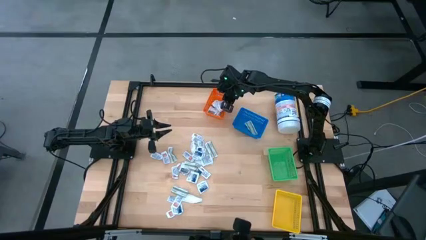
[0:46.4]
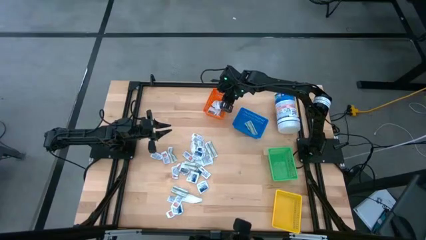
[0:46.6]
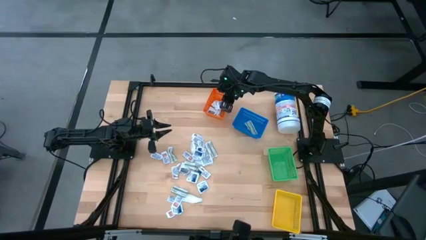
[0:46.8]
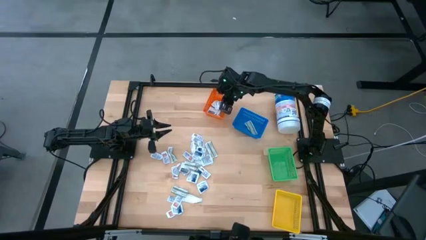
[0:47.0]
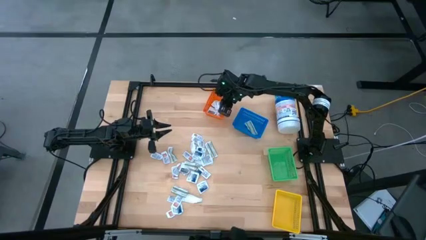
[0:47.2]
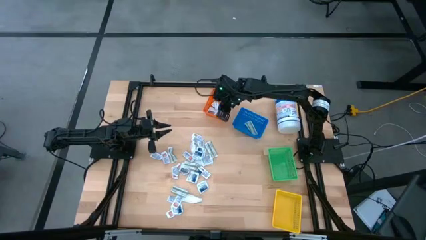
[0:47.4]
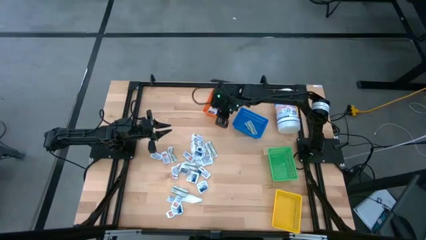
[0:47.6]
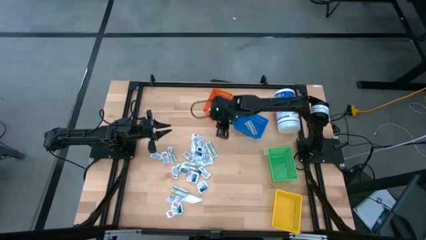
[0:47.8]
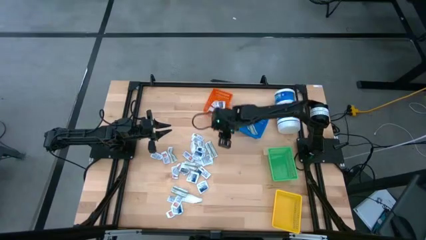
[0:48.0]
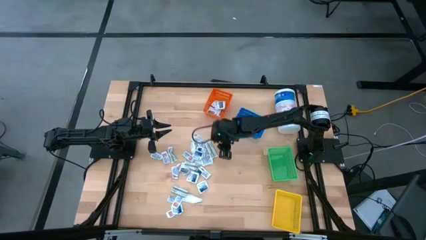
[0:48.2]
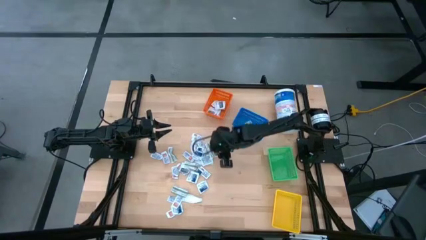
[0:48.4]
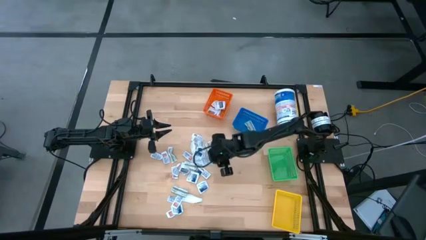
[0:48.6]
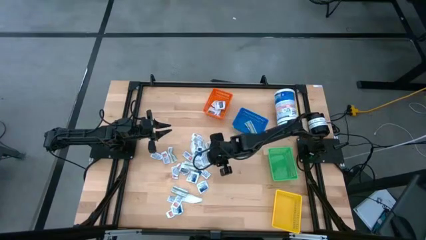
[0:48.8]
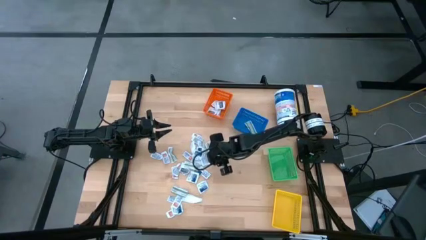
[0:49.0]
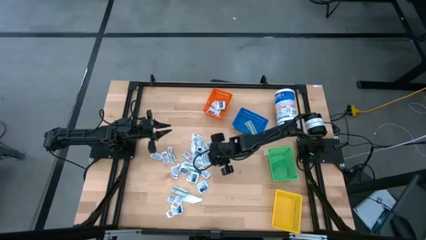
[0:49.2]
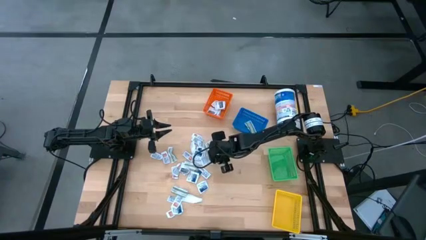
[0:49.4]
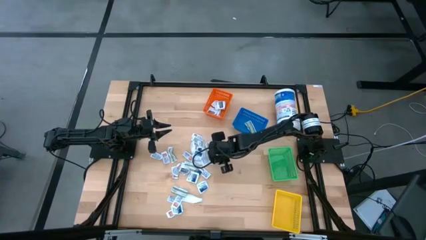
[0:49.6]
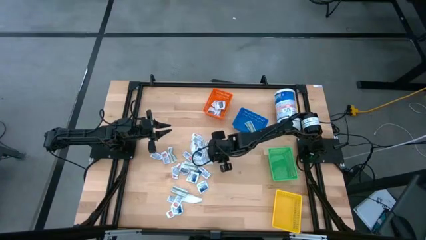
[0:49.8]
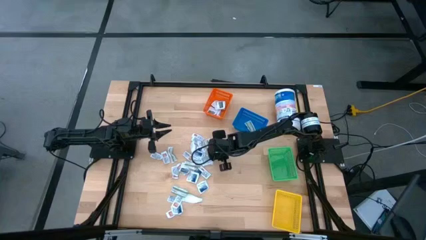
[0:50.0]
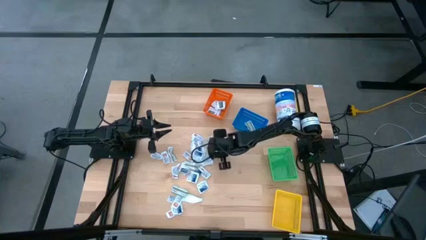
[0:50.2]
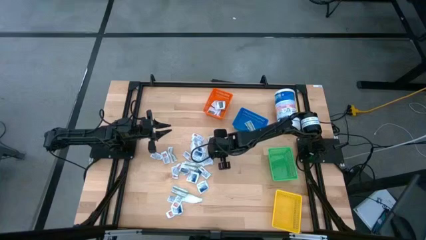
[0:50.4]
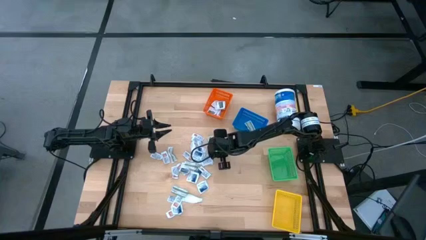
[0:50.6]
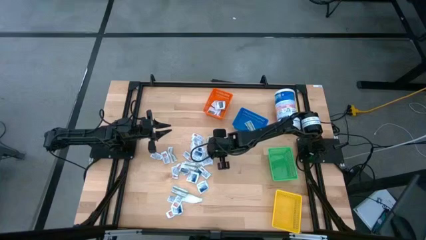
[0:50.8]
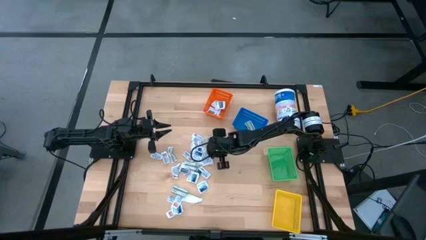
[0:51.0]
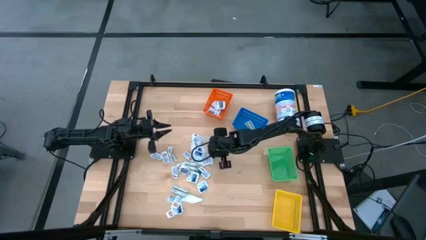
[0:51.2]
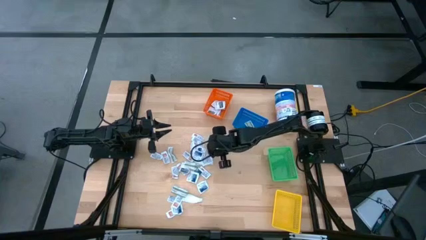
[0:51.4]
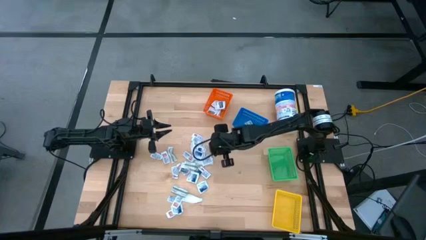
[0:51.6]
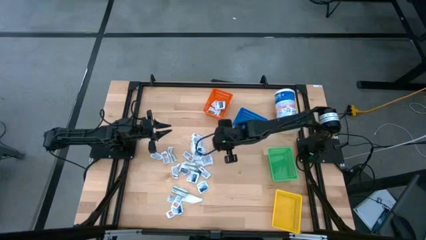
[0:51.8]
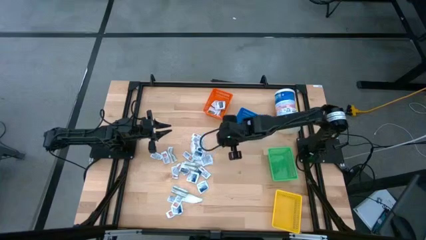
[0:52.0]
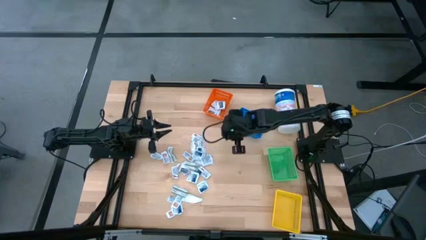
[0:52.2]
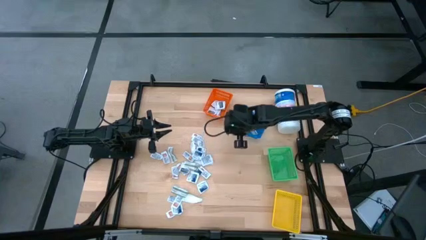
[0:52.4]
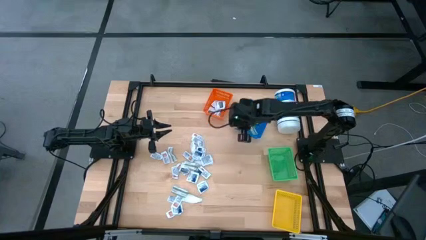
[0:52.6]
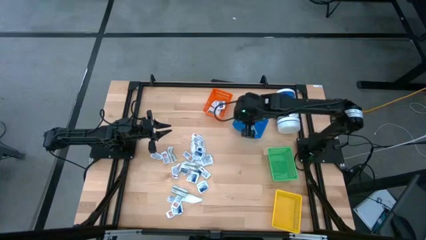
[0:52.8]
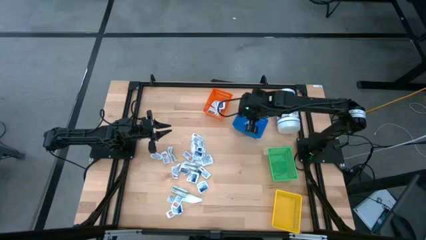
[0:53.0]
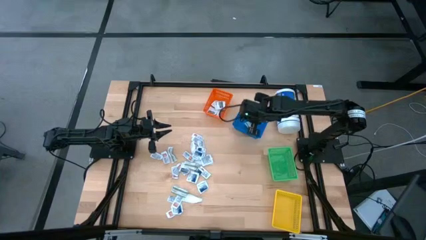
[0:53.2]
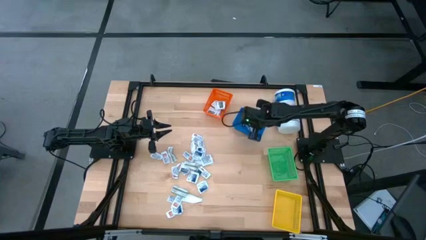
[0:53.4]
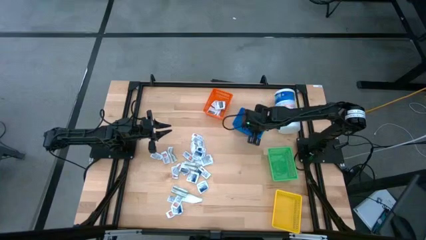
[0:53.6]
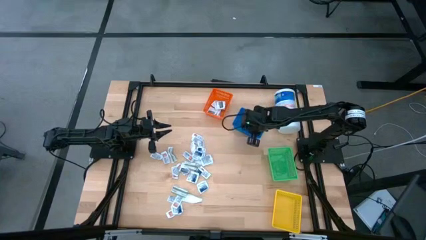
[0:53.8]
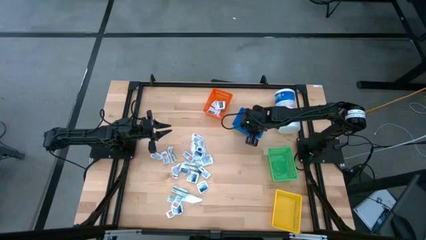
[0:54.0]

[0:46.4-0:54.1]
Task: Pick & Place First Aid Supplies
Put the green bandage pack into the blue basket

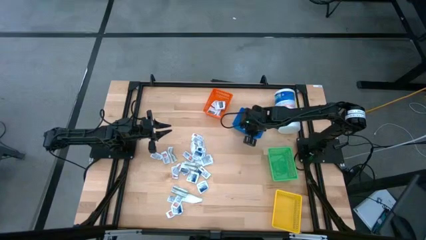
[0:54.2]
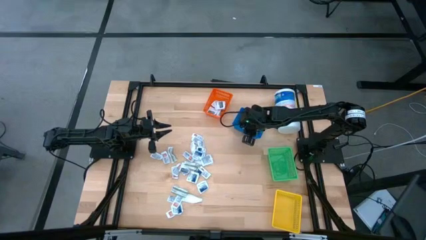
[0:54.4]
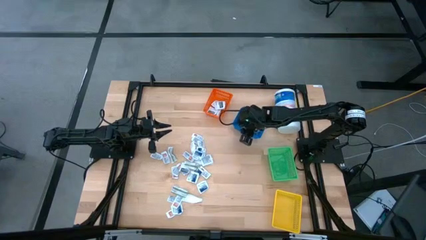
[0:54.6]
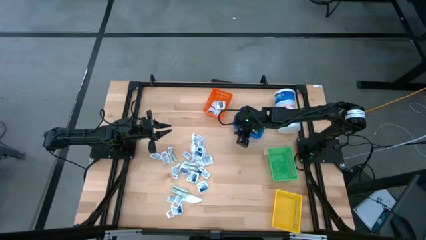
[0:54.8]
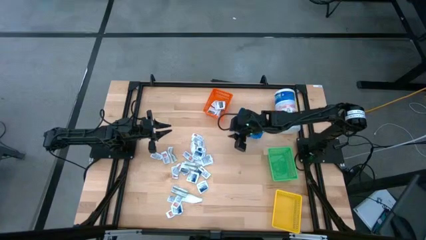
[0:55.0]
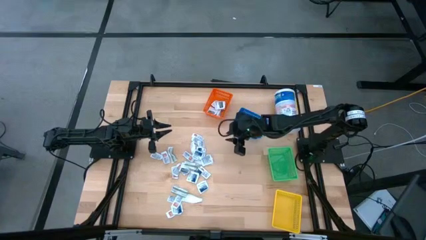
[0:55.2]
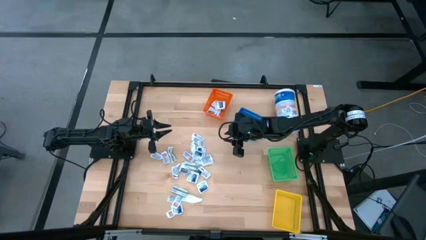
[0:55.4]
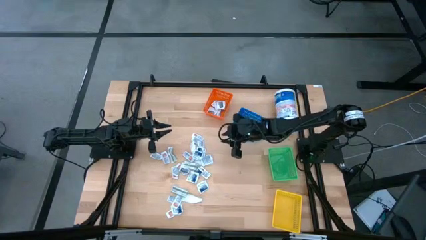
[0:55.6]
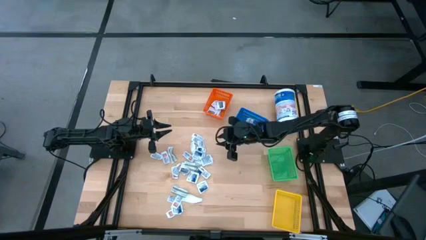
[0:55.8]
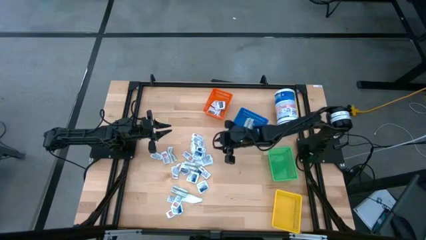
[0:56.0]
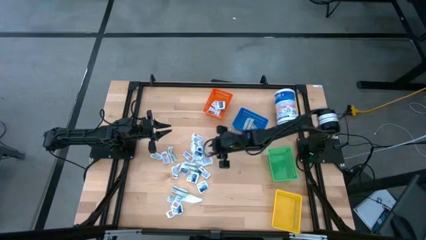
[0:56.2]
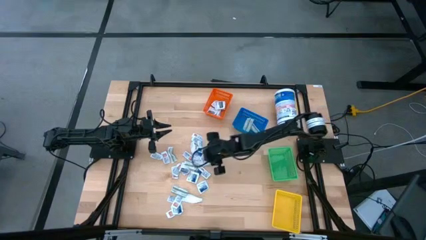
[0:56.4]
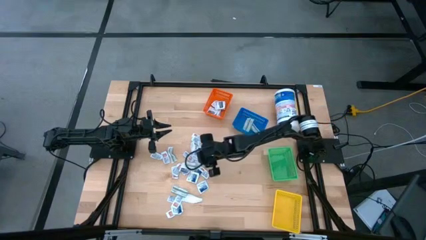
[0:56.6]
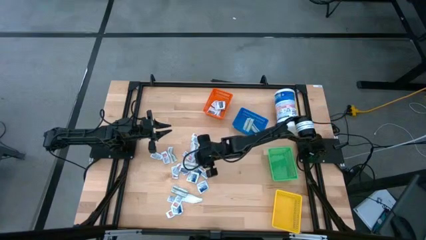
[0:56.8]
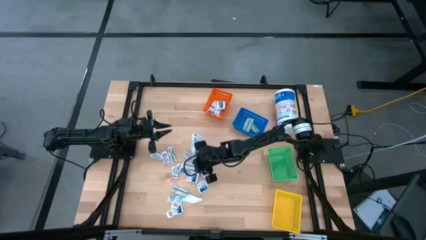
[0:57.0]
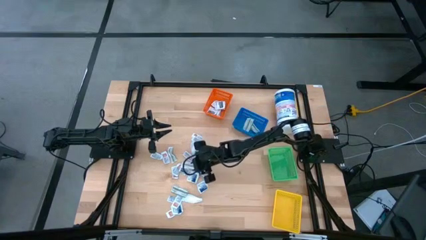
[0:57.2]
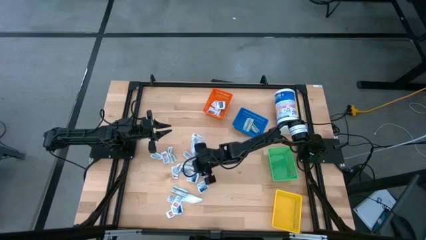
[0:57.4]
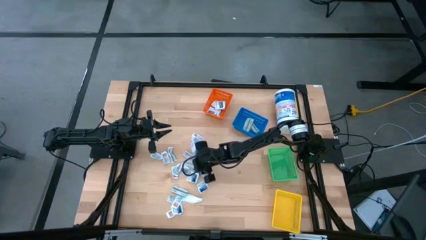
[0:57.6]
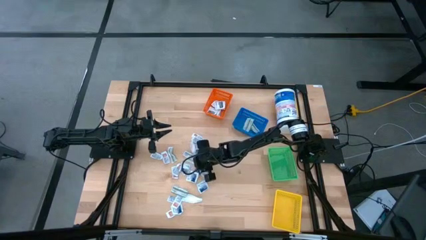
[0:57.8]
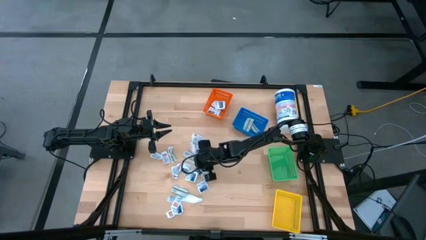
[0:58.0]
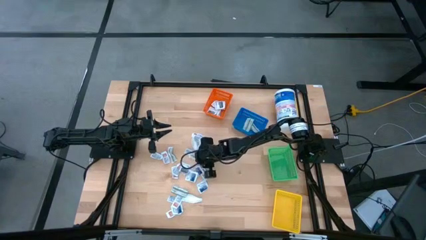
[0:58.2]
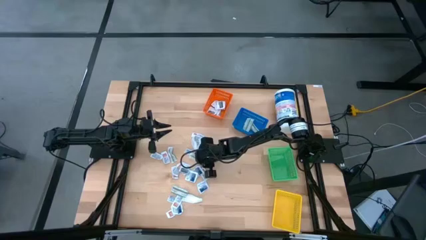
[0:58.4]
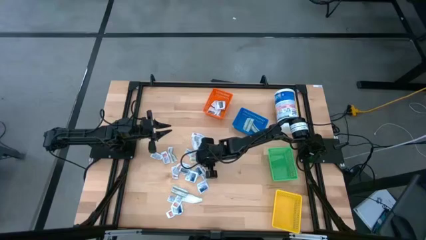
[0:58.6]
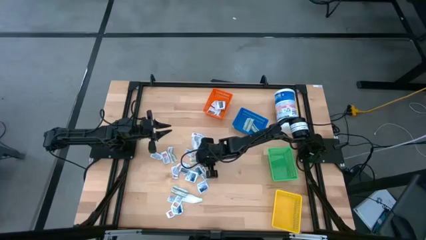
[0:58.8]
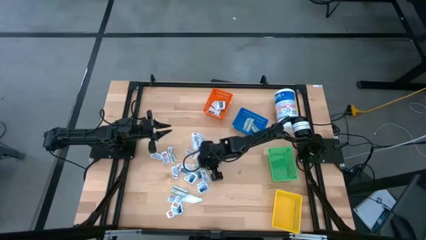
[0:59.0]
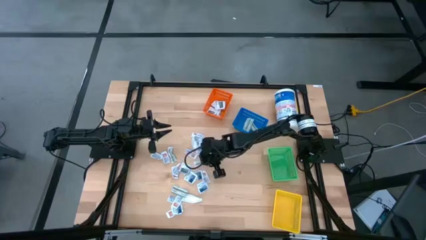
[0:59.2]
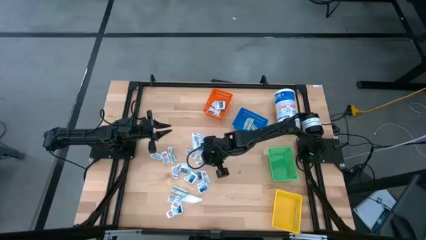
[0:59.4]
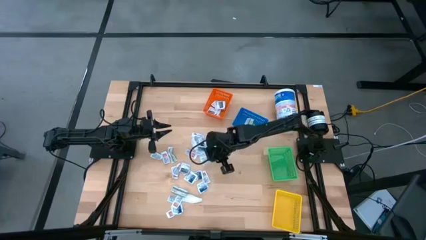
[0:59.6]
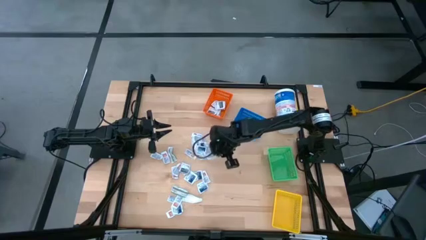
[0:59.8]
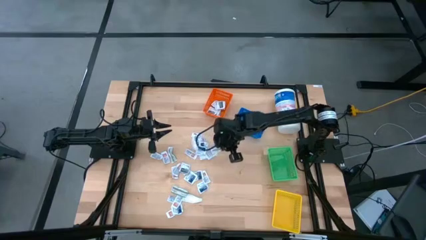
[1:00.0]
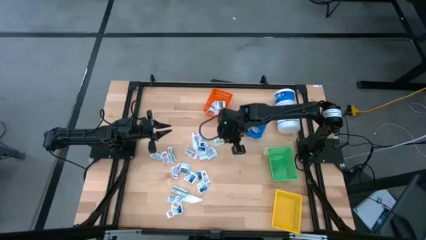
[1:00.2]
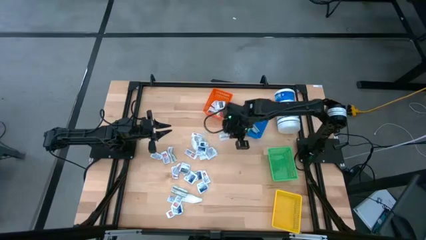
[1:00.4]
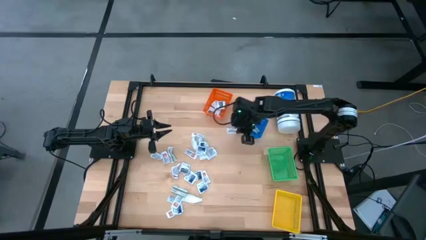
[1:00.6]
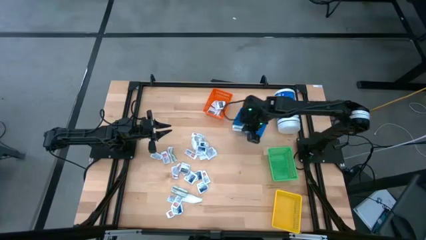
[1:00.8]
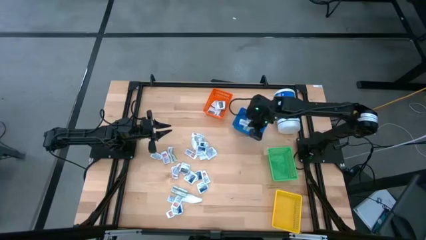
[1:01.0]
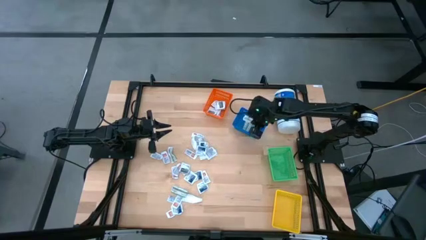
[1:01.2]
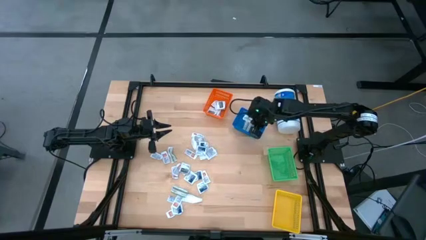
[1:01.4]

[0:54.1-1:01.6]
Put the green bandage pack into the blue basket

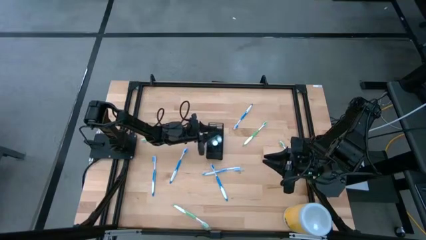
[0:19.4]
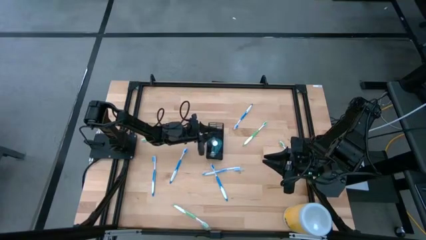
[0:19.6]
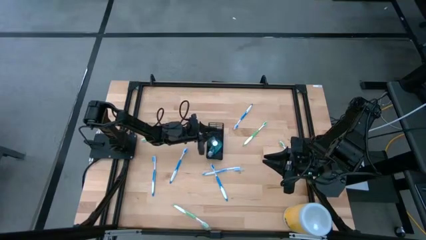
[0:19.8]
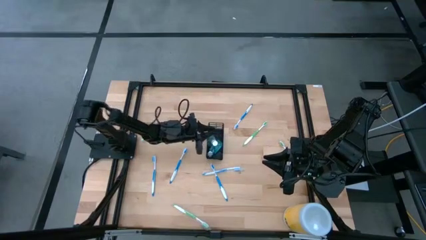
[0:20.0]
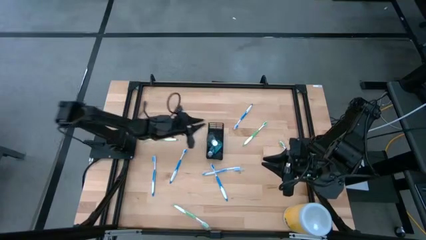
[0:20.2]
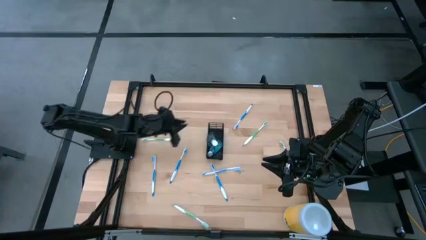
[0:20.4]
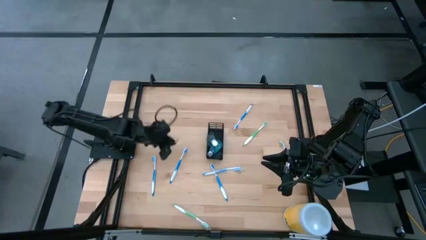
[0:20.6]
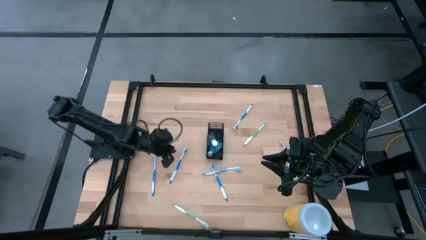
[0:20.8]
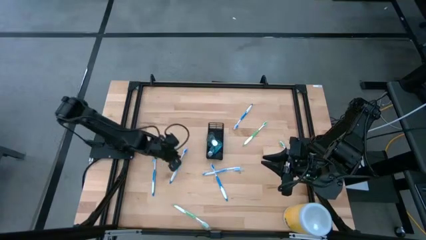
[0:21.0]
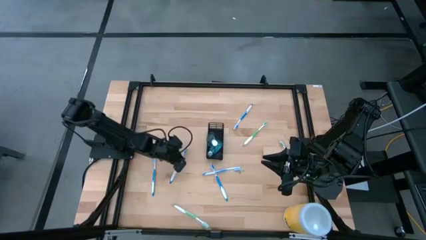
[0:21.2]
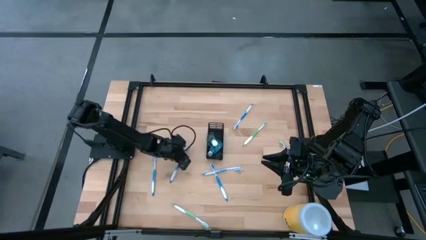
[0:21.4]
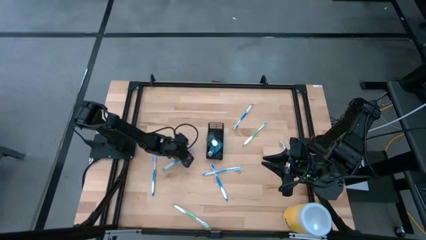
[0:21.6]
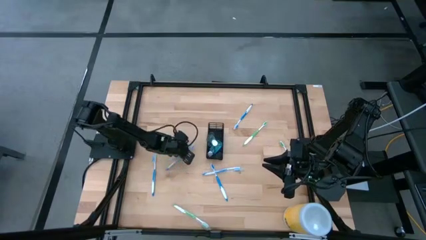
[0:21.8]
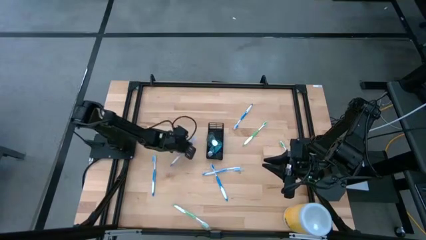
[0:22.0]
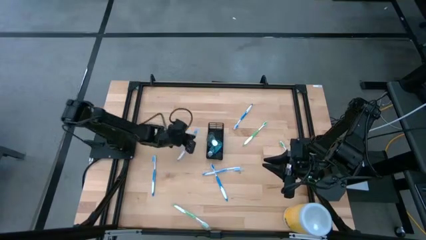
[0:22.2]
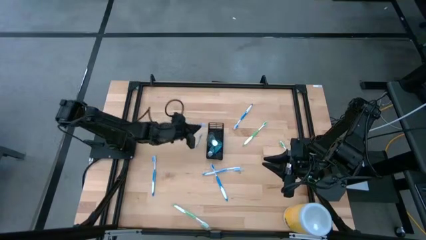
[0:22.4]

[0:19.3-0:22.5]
Task: Pick & Place toothbrushing station
Put the blue toothbrush into the black organizer
